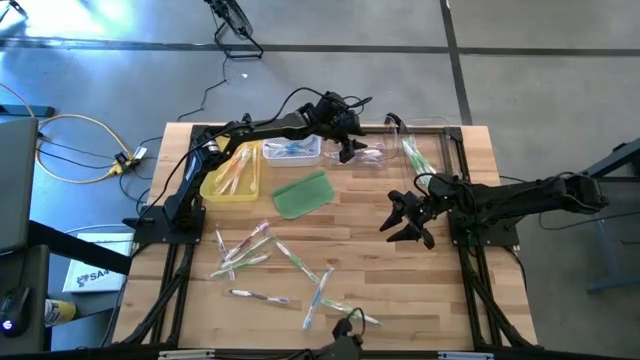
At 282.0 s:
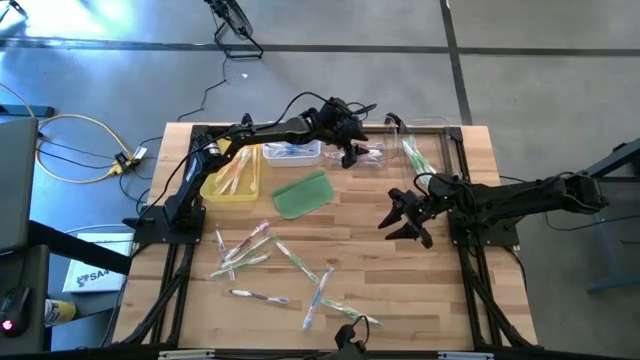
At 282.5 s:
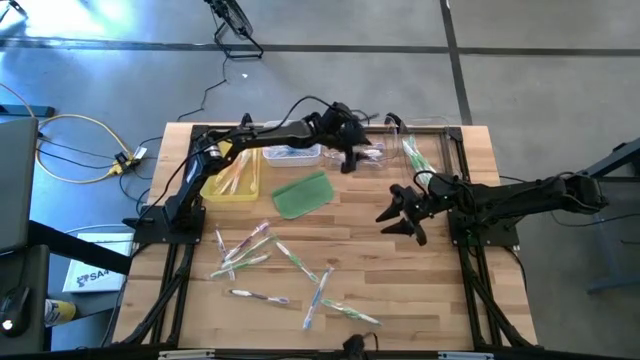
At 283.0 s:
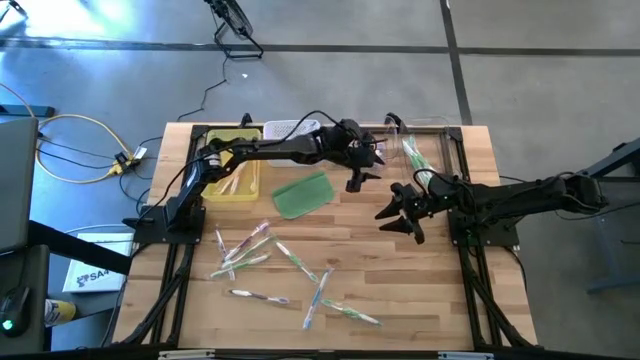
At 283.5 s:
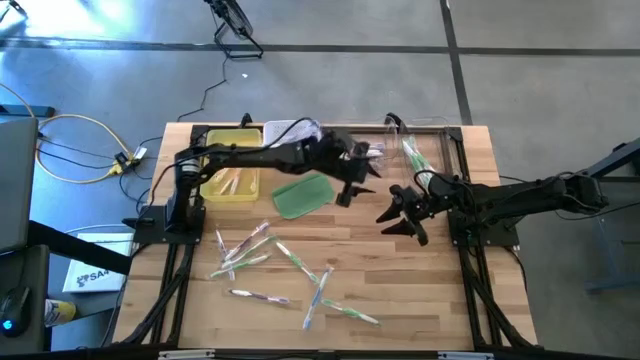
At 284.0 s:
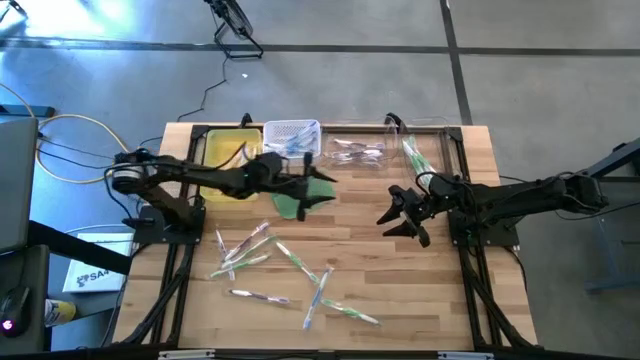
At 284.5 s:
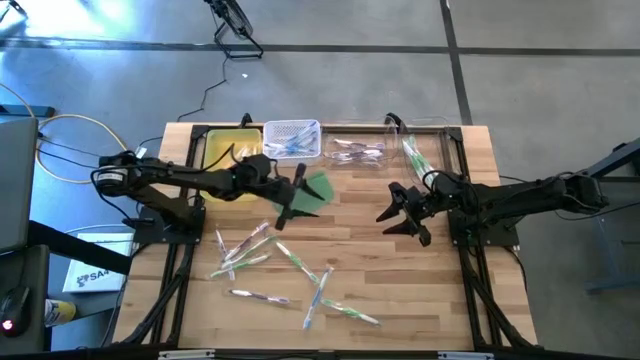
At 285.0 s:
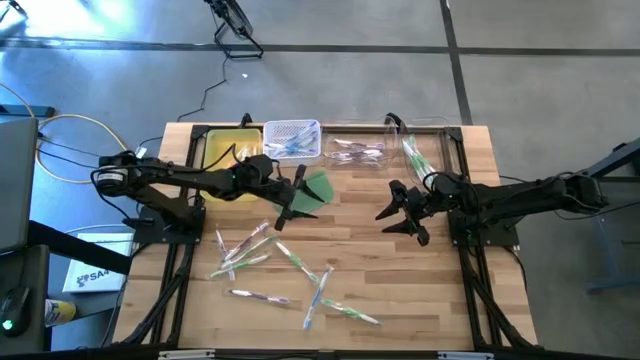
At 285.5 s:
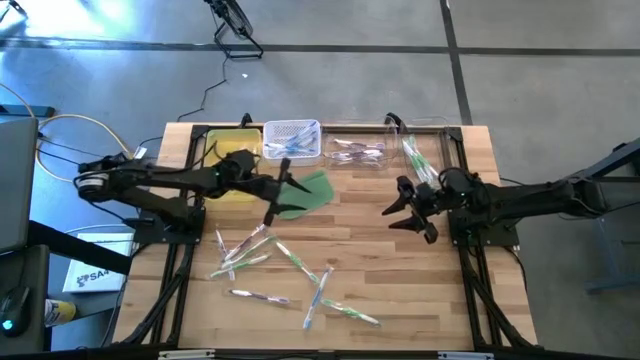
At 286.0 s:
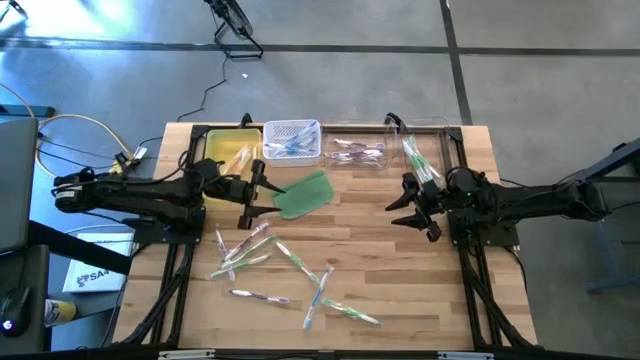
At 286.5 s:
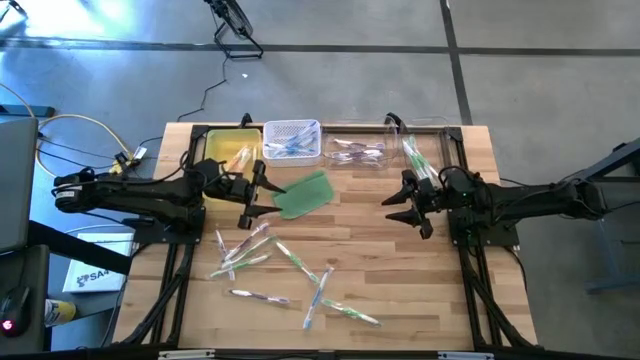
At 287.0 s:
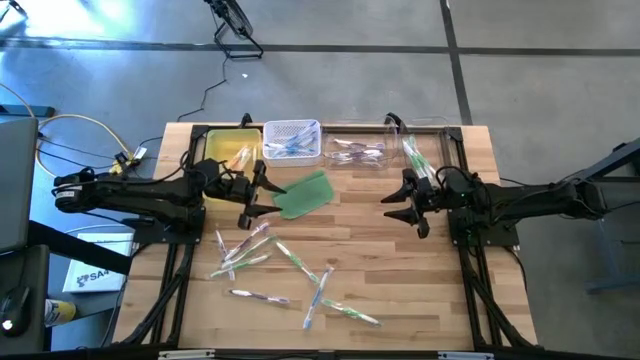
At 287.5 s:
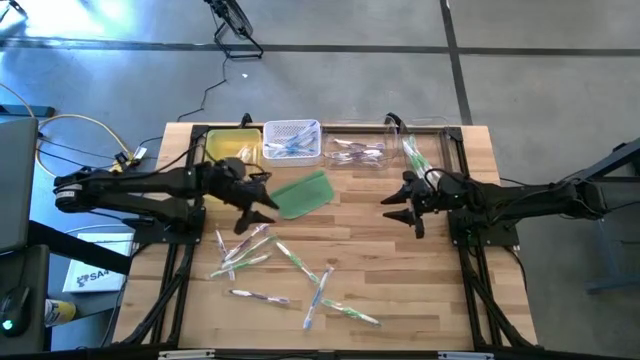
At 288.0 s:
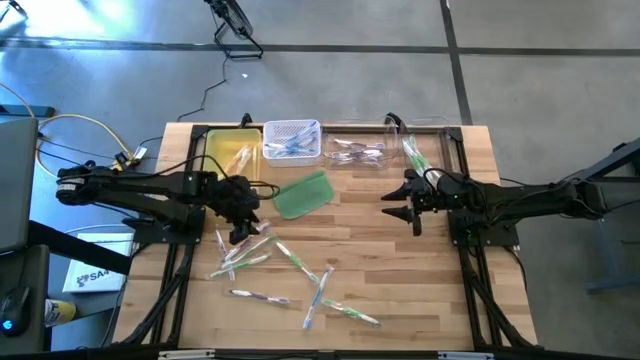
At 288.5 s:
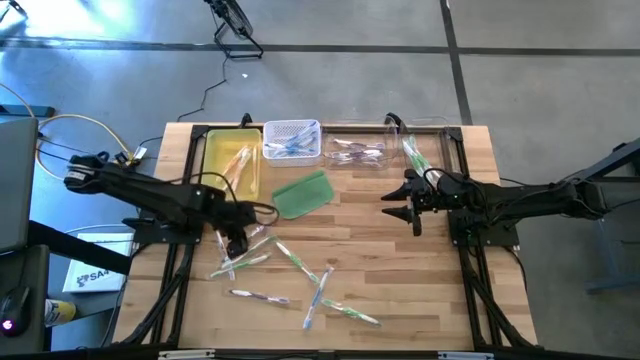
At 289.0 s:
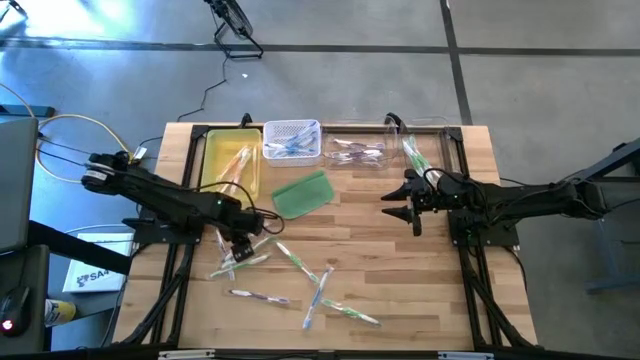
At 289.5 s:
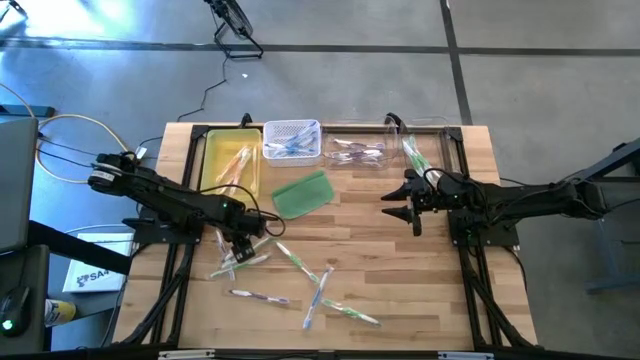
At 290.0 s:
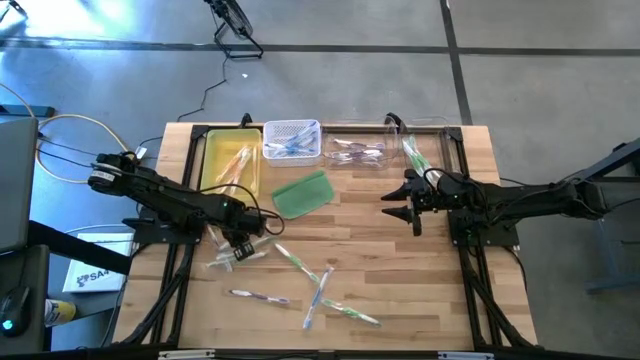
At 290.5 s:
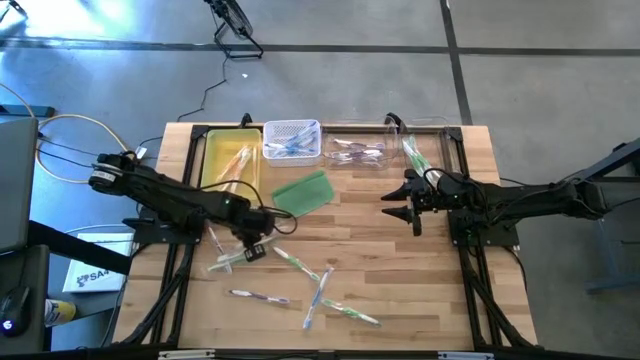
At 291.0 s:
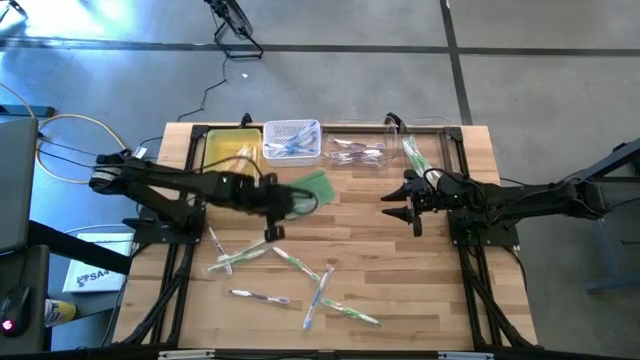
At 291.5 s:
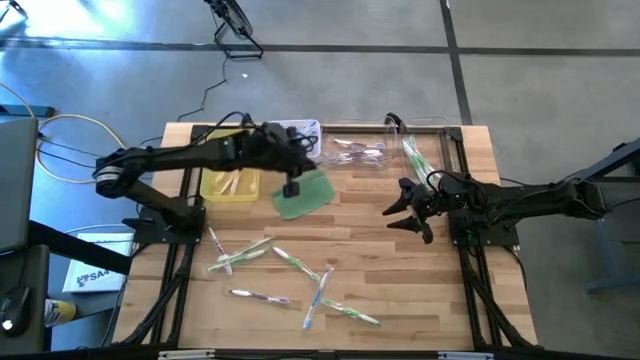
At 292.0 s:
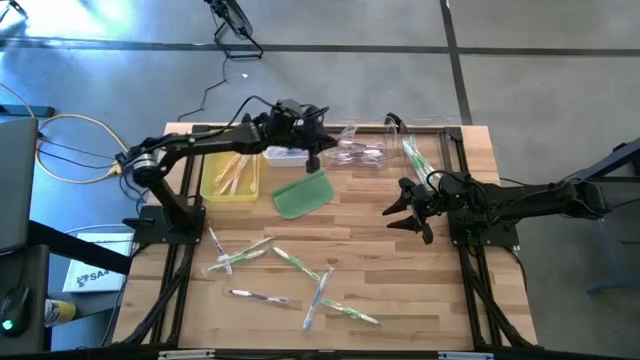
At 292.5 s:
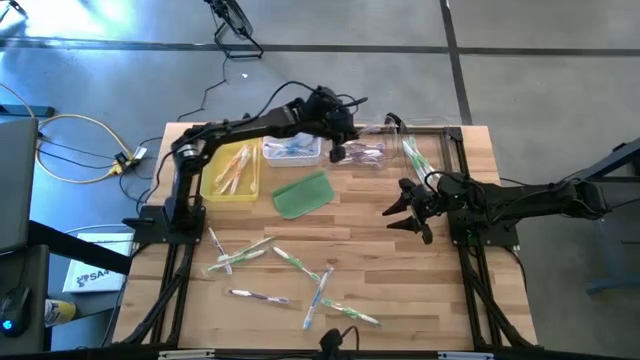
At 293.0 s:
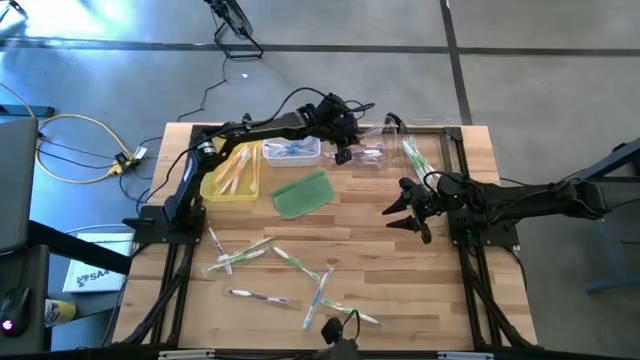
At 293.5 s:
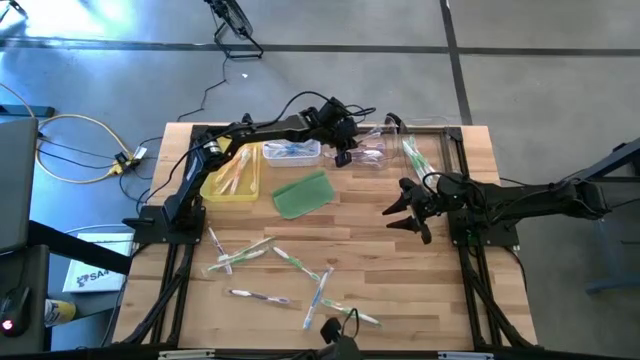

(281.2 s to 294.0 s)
Task: Pick & Place Toothbrushes
Put the violet toothbrush into the left transparent bin

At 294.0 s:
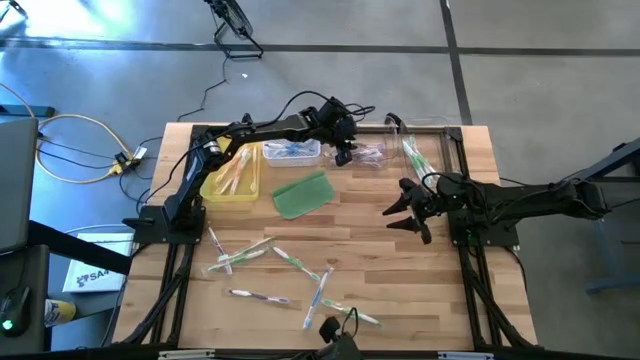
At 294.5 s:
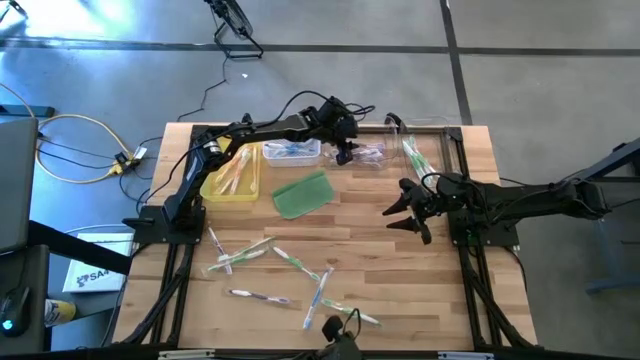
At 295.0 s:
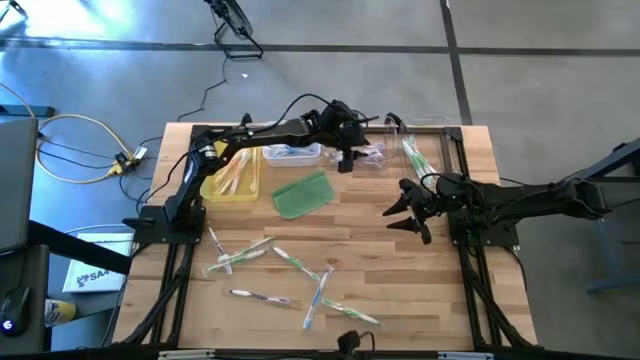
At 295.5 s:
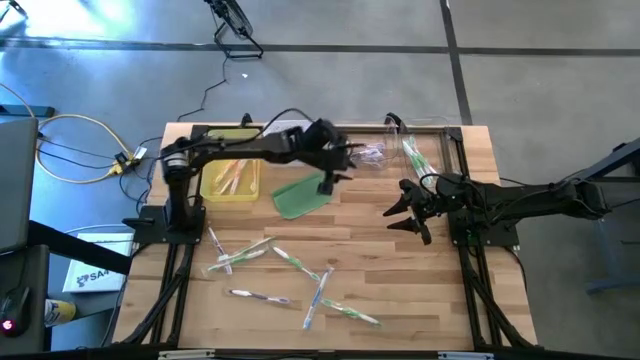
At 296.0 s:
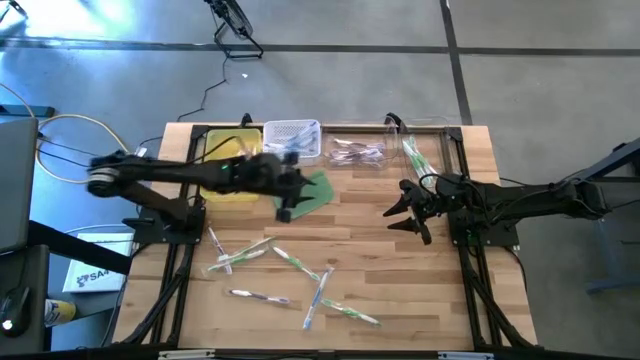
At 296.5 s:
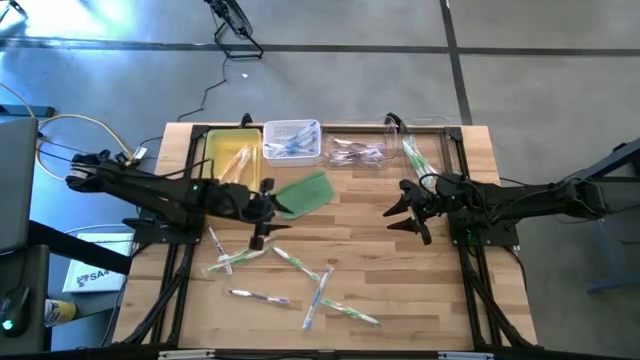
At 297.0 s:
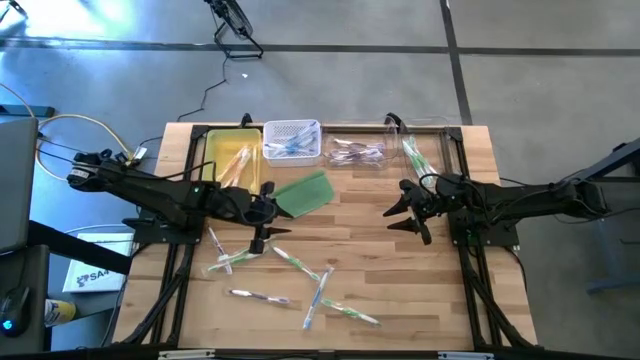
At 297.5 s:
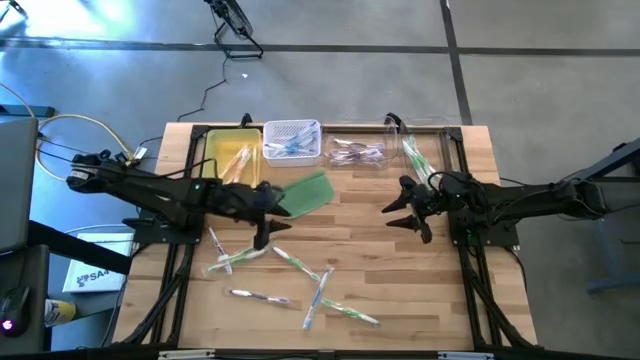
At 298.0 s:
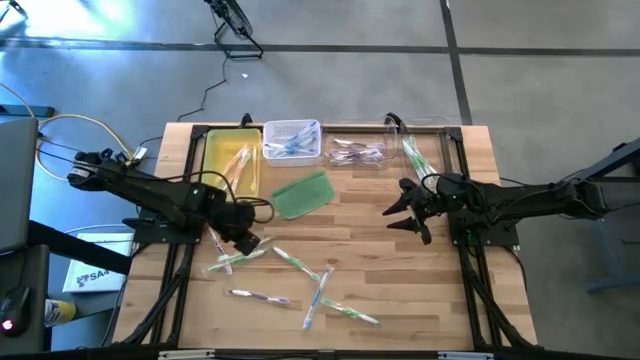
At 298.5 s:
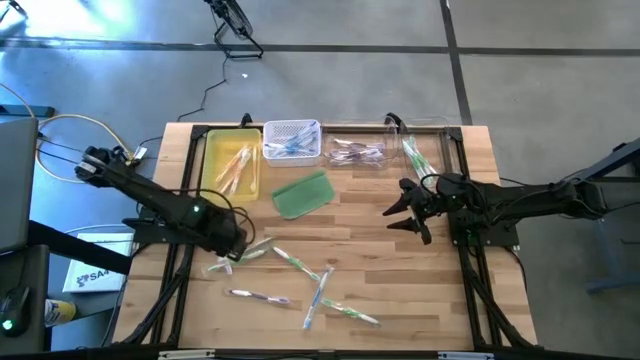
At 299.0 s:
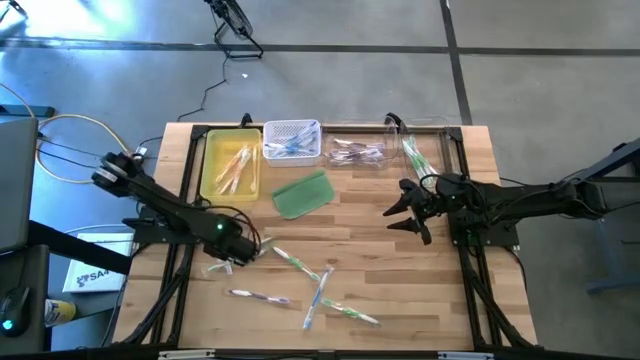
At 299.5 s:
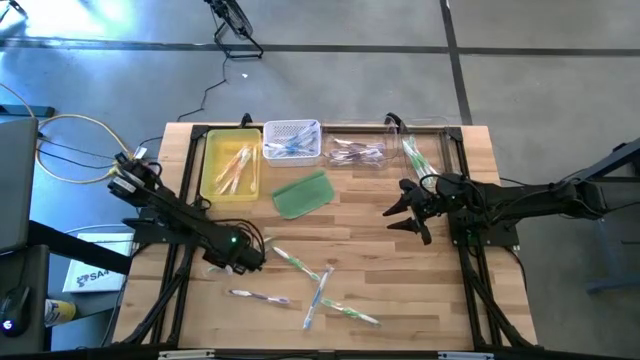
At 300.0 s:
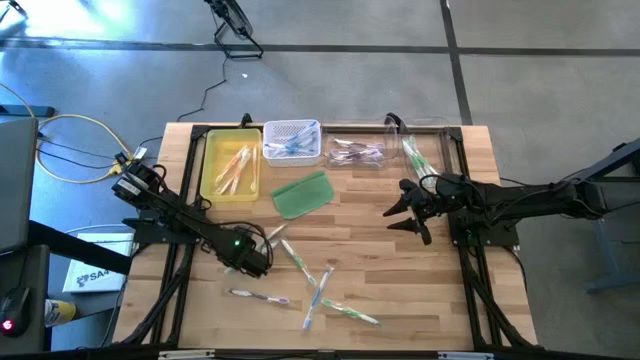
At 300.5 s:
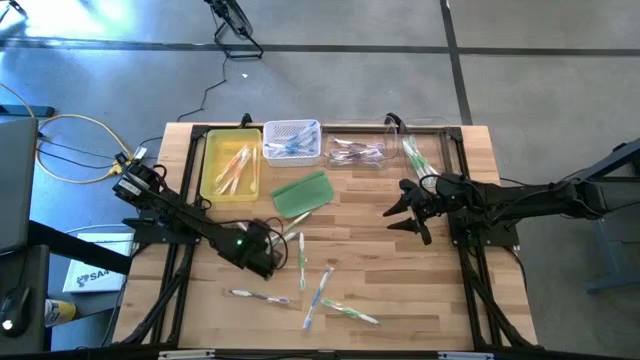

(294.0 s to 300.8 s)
Adjust the toothbrushes

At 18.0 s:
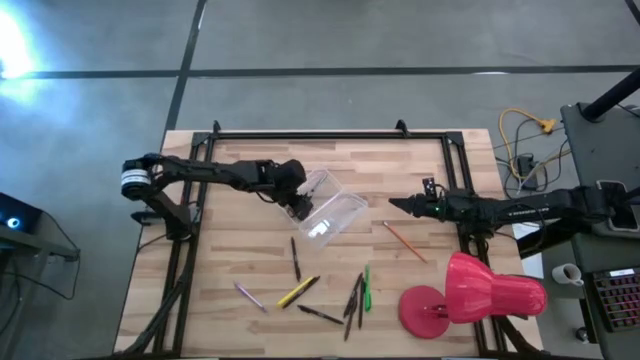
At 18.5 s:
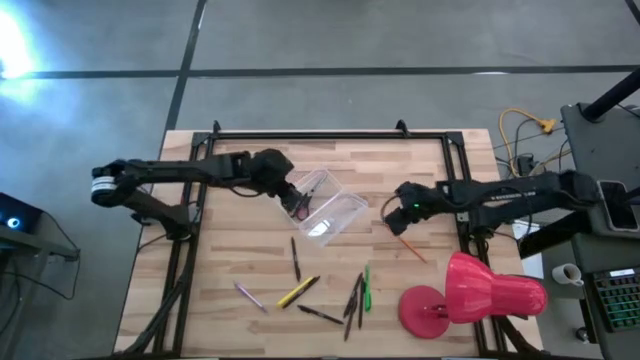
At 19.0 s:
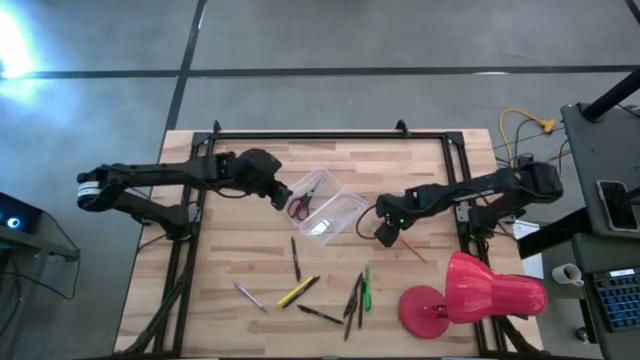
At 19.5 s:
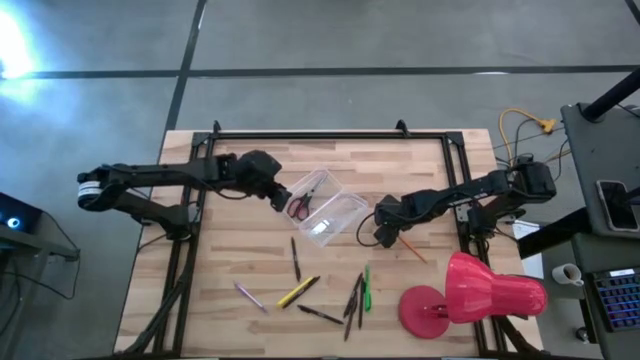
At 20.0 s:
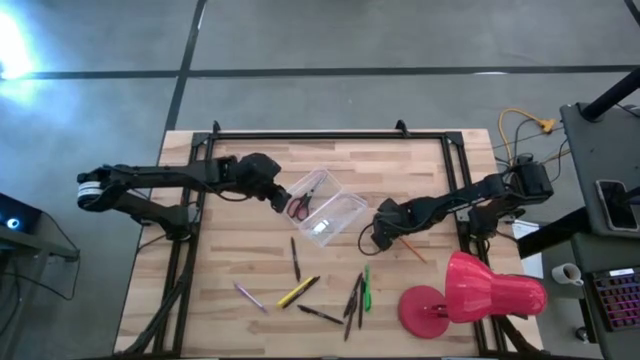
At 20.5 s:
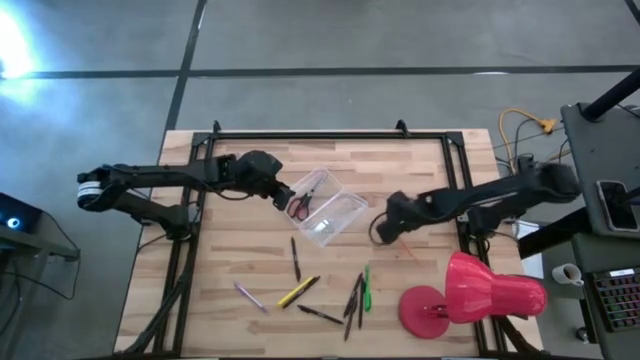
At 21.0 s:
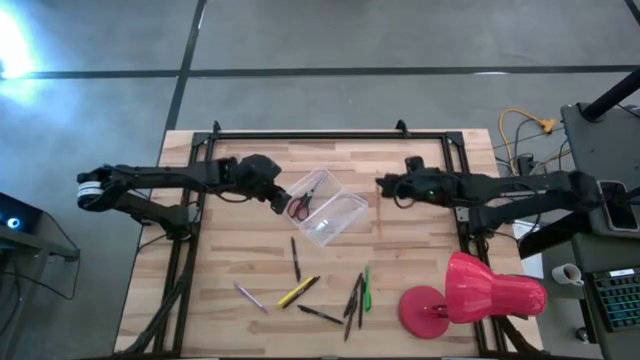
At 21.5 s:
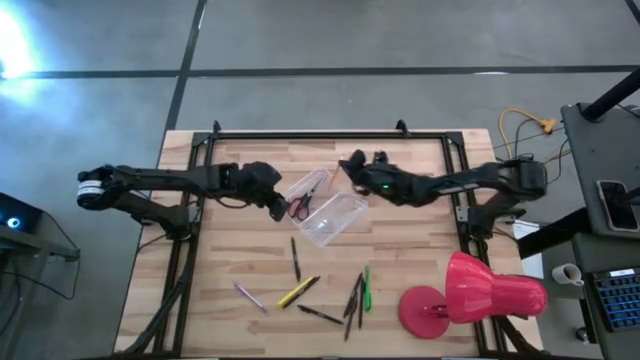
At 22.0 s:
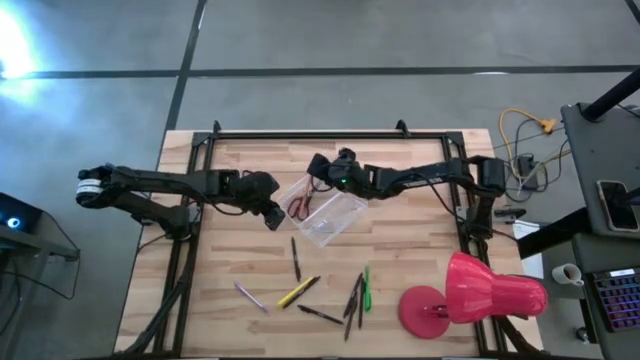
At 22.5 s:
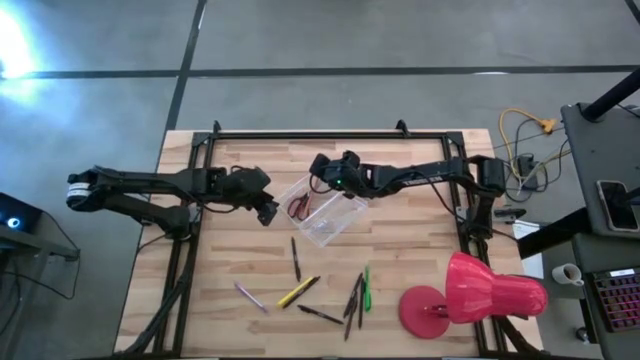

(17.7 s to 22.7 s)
Task: Pick & place school supplies into a supply box
Put the orange pencil into the transparent supply box
